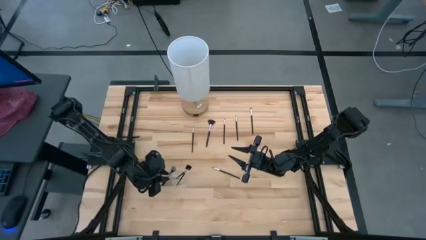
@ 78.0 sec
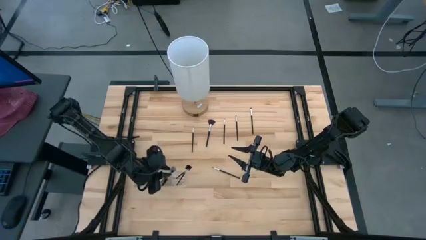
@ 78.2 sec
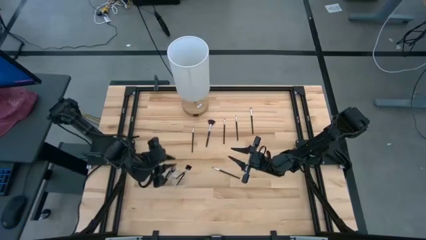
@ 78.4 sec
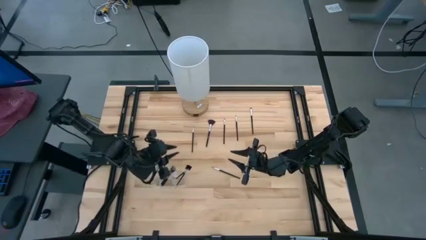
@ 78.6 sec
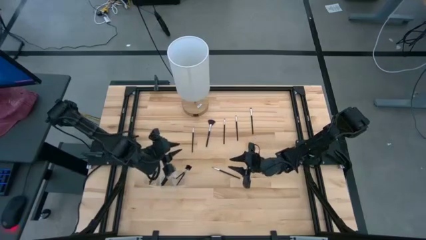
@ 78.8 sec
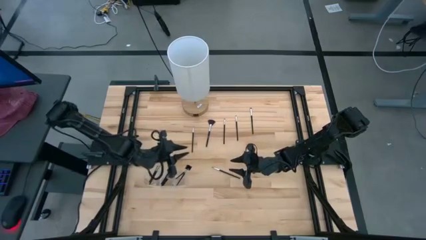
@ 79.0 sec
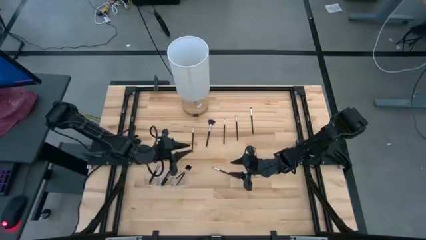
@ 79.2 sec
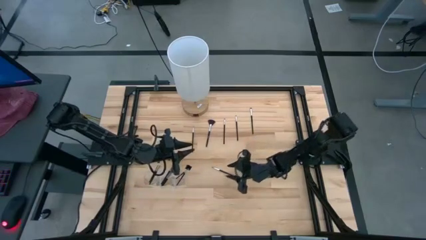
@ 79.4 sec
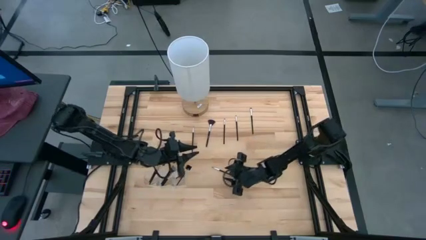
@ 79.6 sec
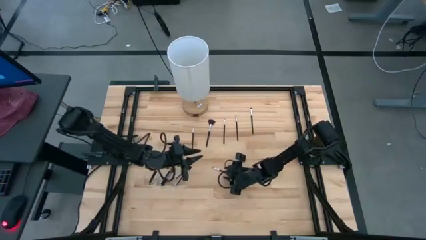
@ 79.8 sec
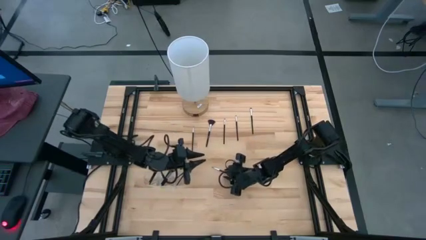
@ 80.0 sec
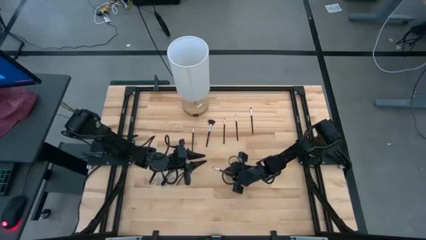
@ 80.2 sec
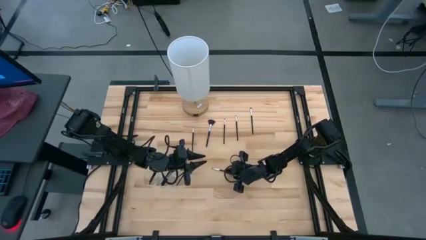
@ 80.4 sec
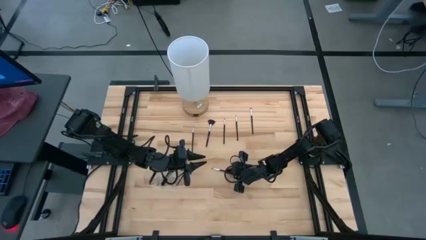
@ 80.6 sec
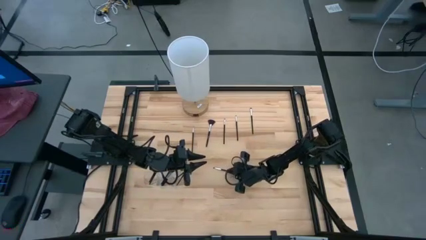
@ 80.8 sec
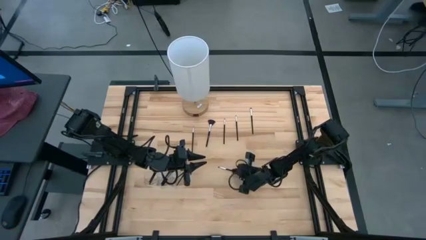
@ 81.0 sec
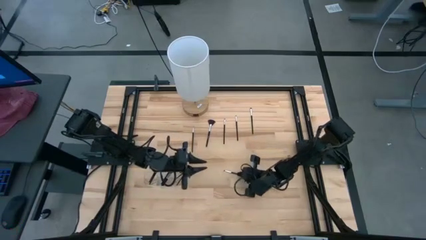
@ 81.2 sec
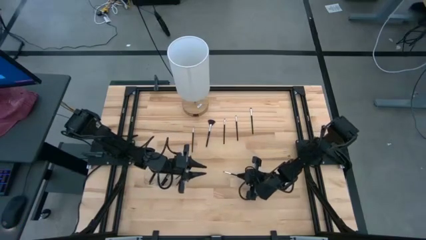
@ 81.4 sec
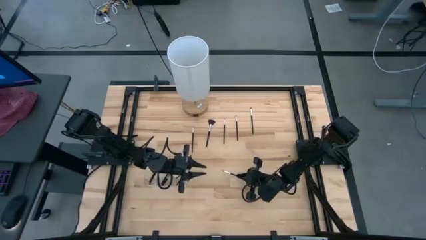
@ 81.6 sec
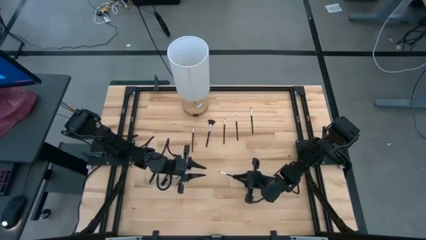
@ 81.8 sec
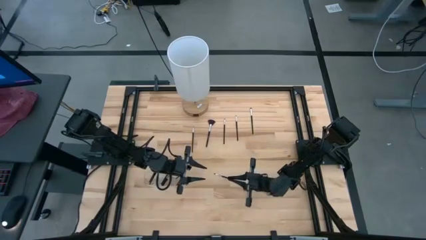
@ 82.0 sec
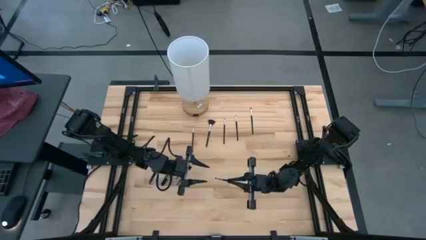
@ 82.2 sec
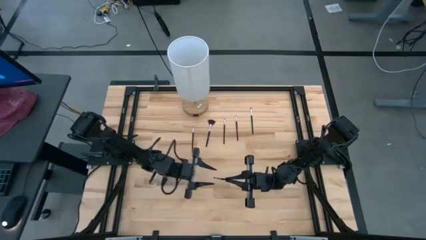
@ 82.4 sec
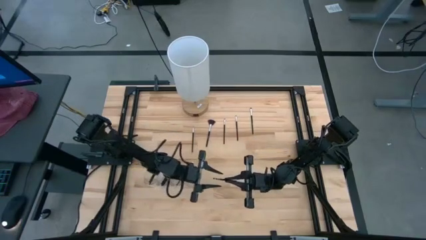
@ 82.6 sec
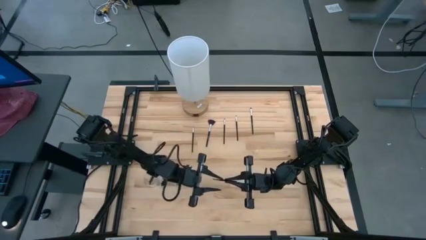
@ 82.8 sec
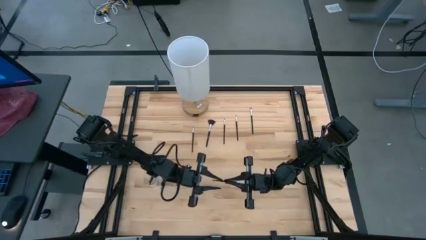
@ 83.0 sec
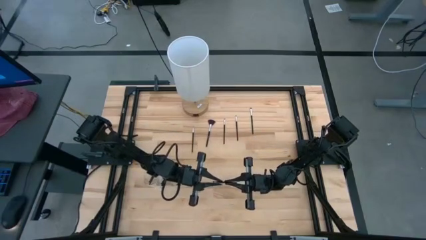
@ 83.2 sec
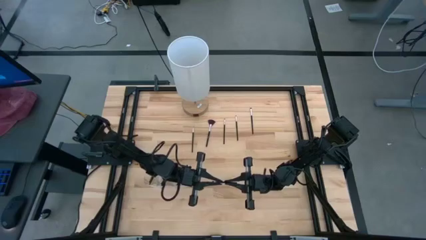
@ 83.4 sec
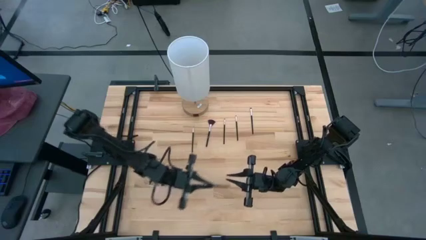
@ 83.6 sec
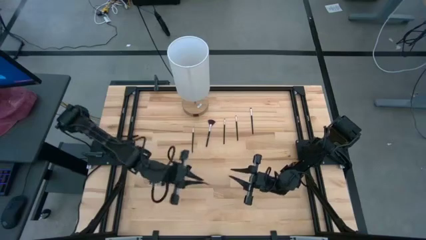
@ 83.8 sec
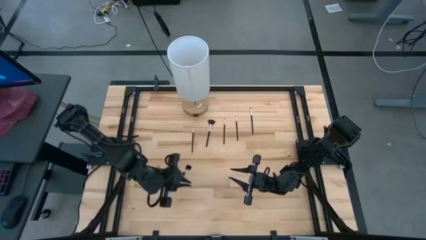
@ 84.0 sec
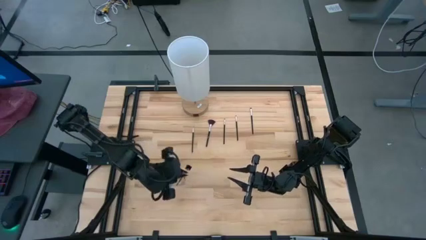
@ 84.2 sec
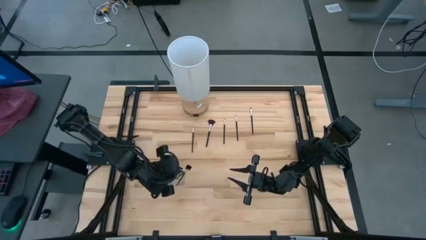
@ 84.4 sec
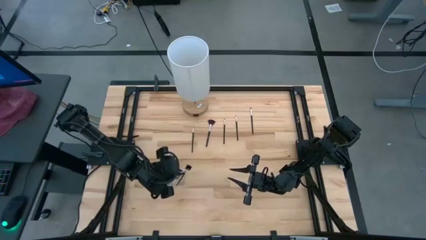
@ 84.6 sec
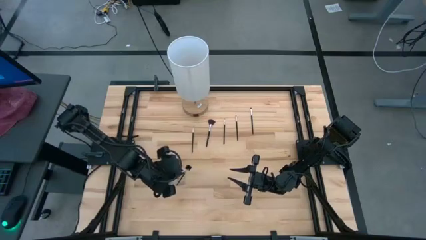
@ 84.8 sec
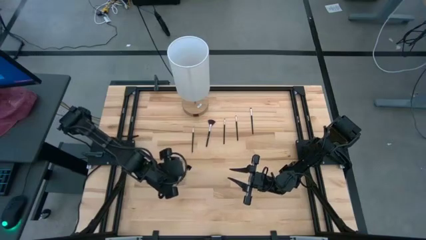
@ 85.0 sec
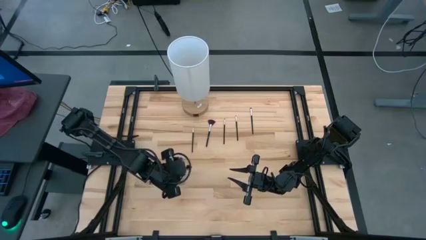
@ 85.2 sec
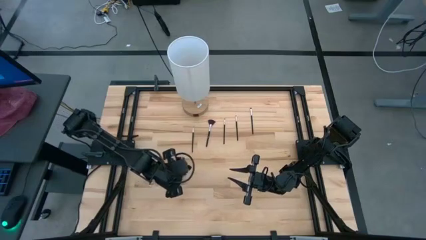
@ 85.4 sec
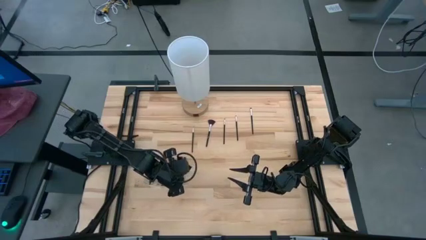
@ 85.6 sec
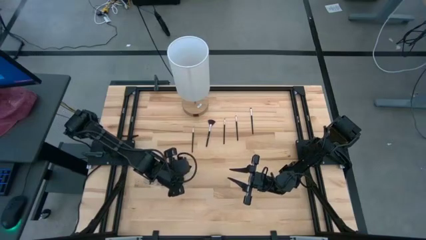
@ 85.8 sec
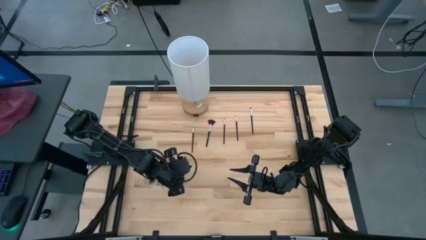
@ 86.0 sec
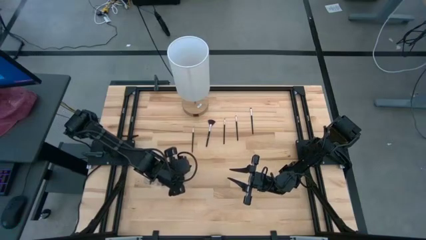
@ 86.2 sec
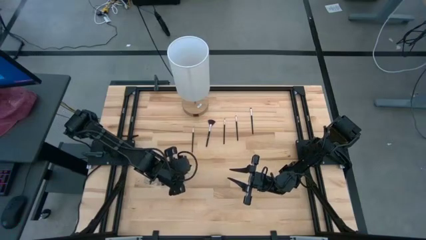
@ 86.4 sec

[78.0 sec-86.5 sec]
Task: Put items in baskets/containers
Put the eyeshadow brush in the transparent organizer

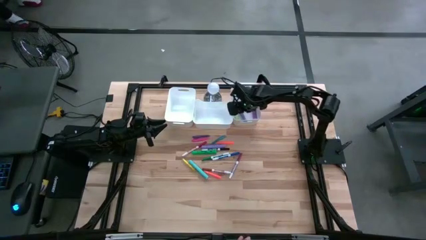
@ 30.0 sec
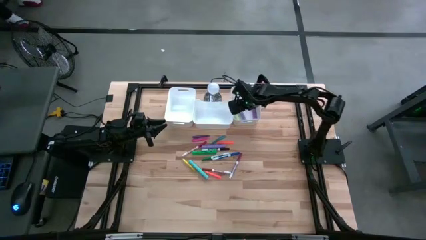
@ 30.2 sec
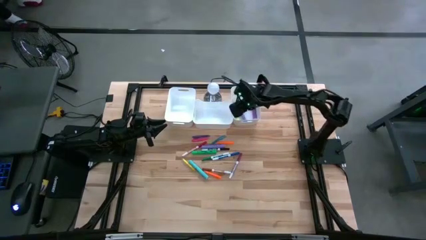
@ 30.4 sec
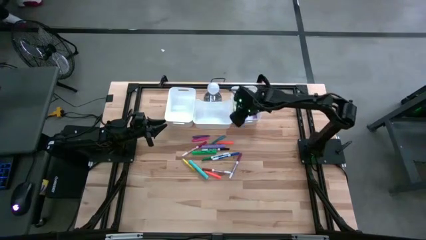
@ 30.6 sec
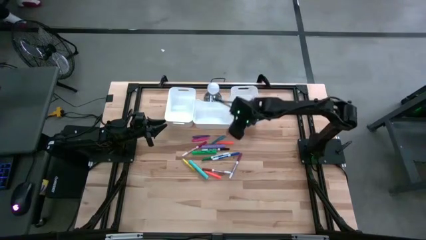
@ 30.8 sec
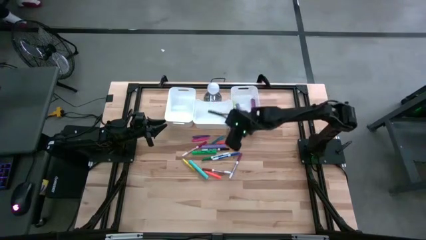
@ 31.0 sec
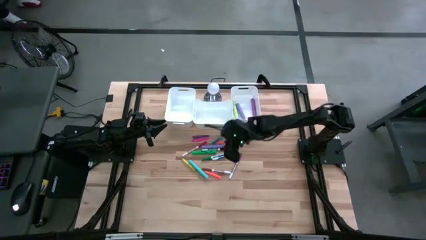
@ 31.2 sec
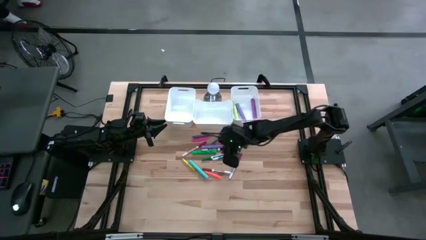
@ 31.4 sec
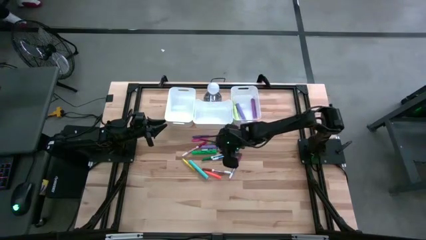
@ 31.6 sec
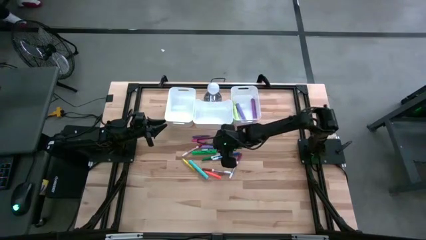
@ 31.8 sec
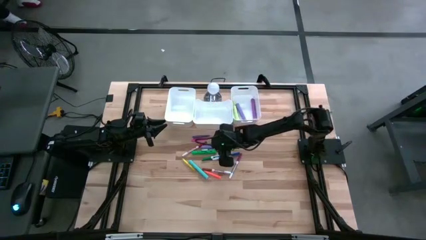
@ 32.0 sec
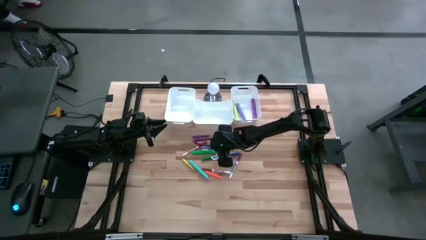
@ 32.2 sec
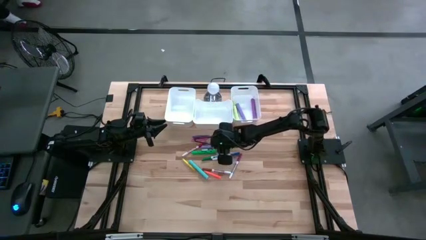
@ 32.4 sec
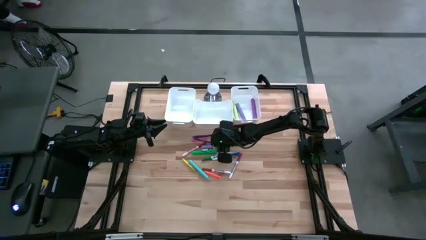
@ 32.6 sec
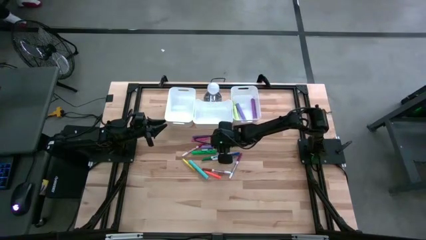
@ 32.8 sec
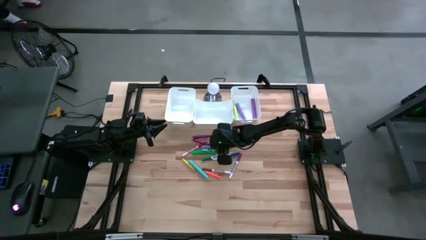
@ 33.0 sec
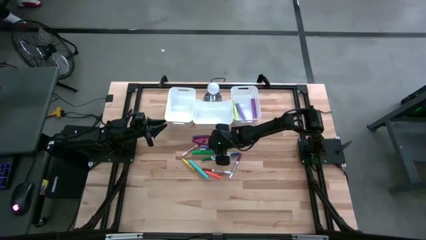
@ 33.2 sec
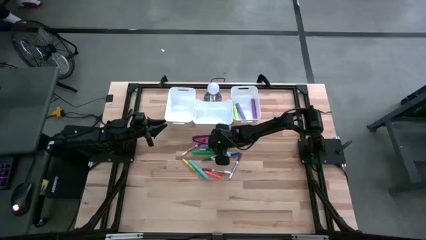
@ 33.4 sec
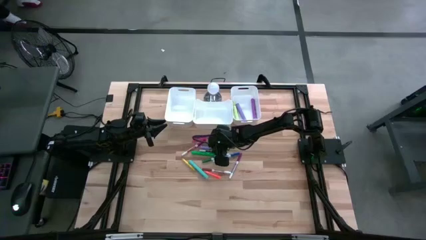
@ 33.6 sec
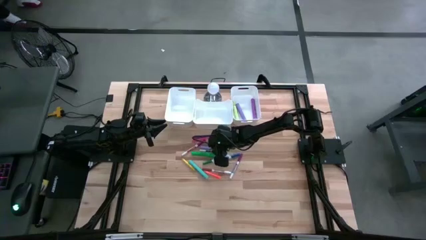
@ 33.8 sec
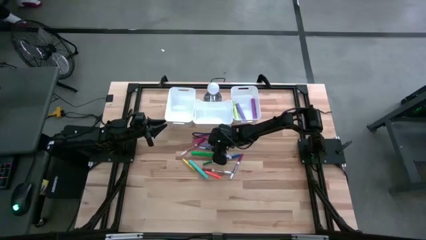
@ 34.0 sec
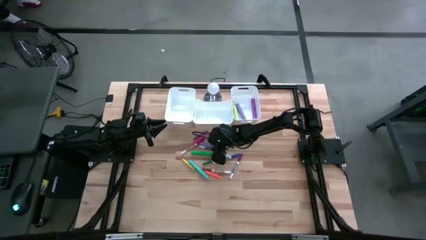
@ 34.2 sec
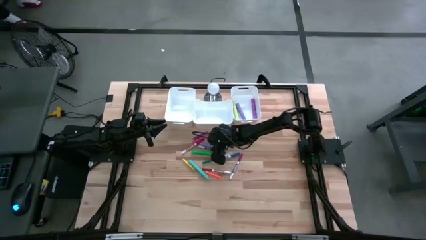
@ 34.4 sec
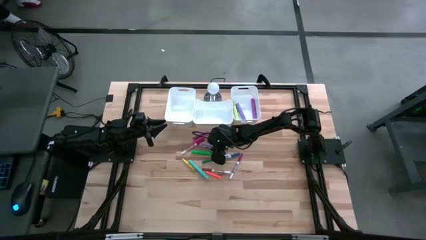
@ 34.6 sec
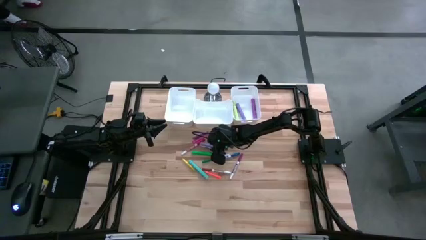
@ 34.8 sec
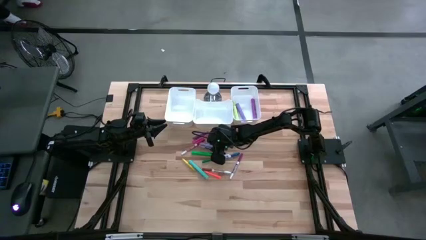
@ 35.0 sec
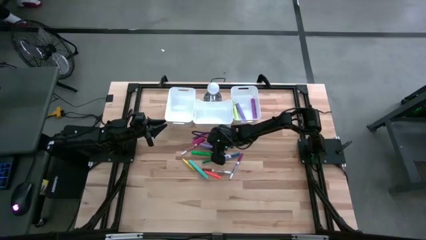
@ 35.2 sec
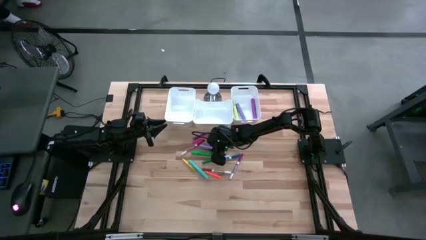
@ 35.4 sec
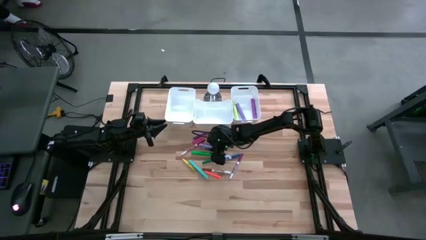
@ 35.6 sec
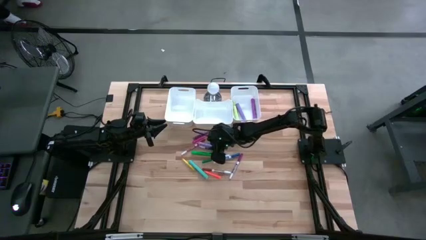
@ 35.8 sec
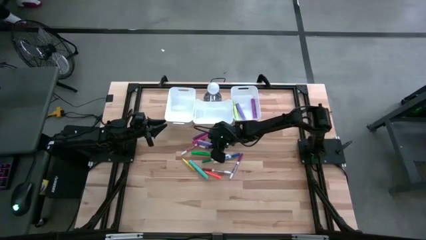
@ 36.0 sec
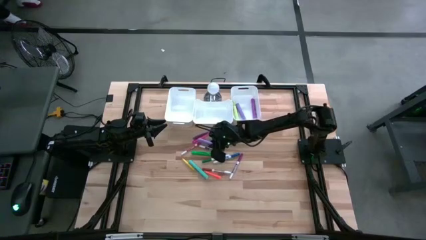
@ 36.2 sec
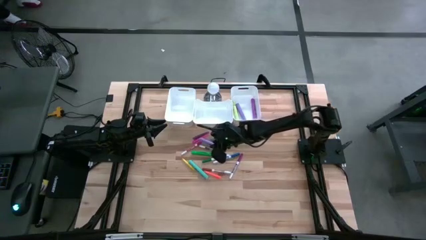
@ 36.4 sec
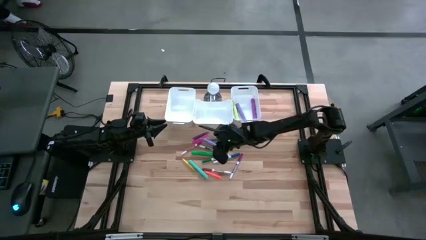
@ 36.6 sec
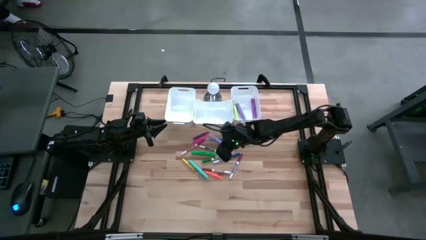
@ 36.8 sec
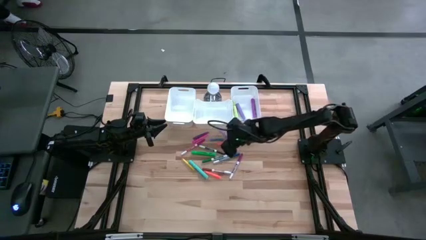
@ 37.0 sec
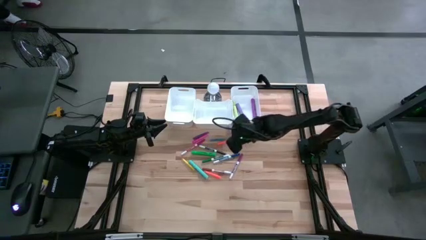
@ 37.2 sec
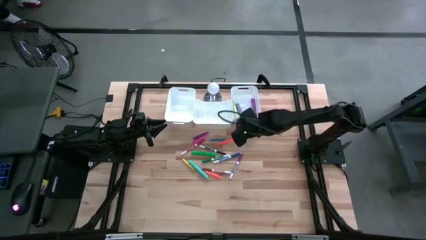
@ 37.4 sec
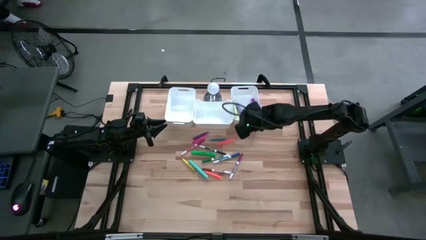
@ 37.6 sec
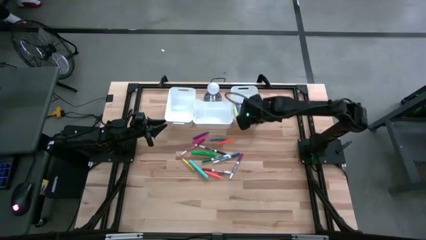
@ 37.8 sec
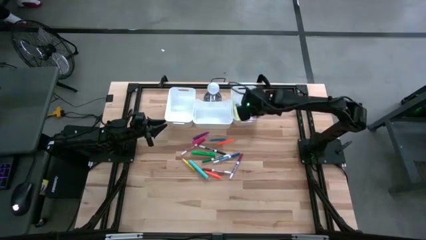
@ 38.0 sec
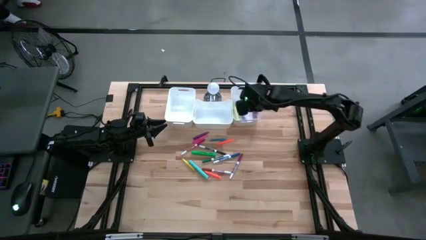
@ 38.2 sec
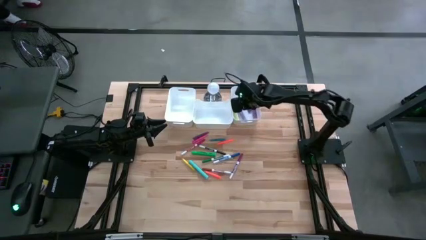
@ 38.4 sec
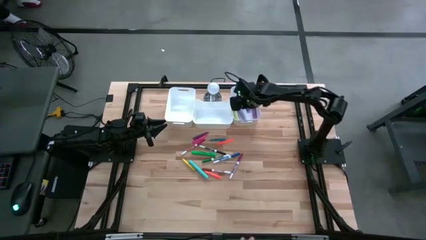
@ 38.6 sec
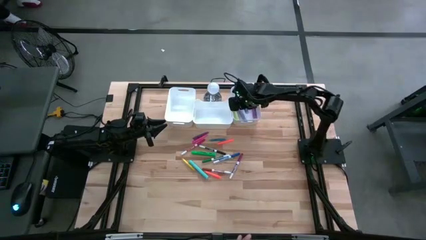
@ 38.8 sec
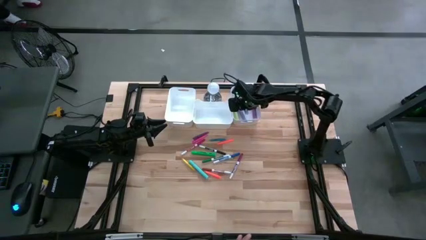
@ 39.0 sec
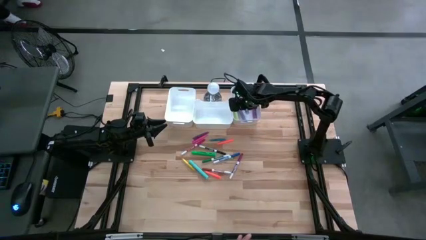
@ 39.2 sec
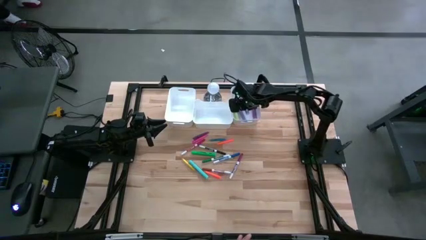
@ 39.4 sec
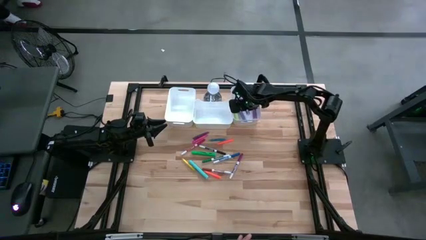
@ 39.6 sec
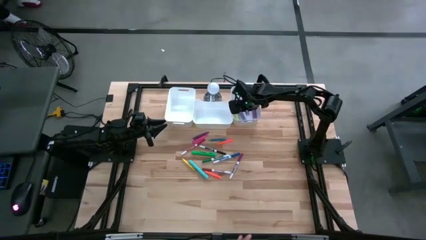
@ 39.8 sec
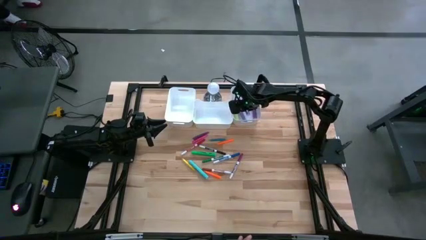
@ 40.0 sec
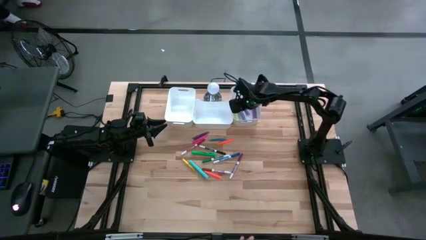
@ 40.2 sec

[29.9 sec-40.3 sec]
Task: Pick & Place Markers
Put the purple highlighter pen into the right white bin
